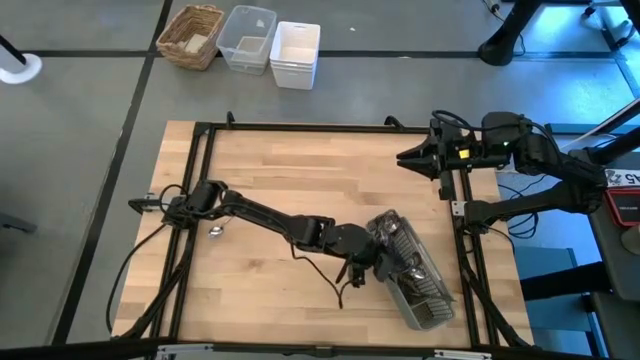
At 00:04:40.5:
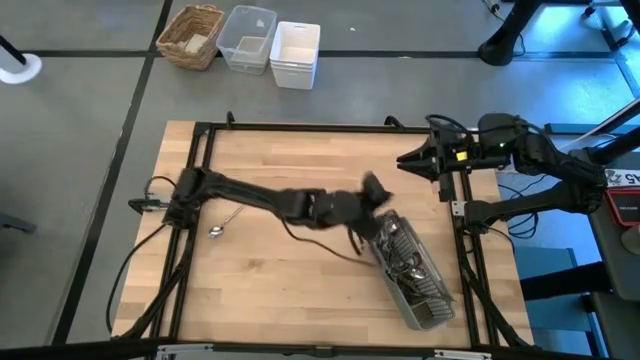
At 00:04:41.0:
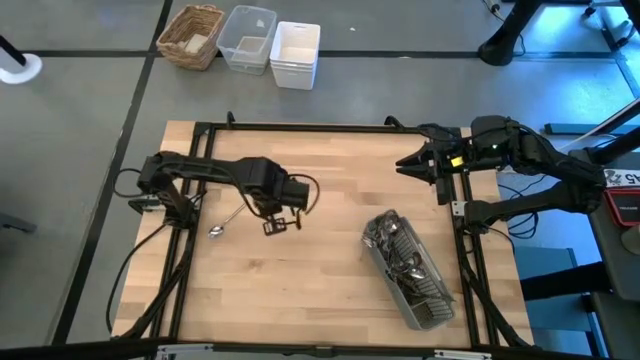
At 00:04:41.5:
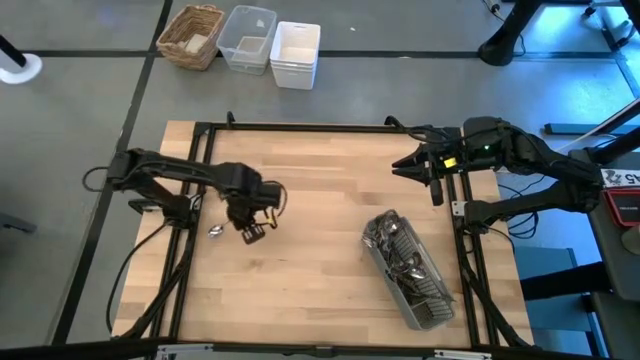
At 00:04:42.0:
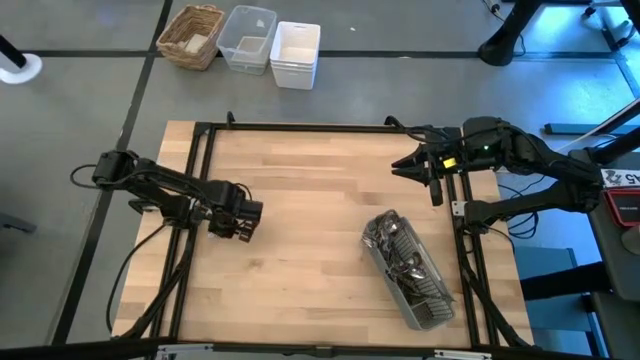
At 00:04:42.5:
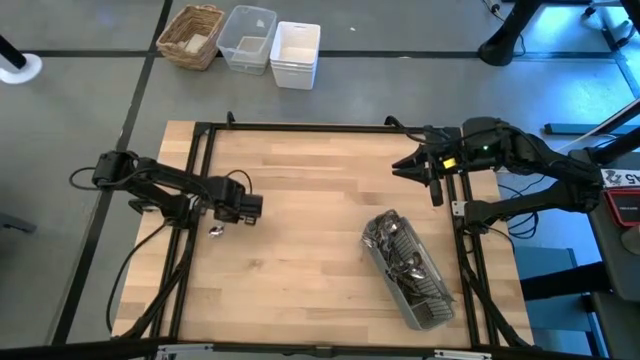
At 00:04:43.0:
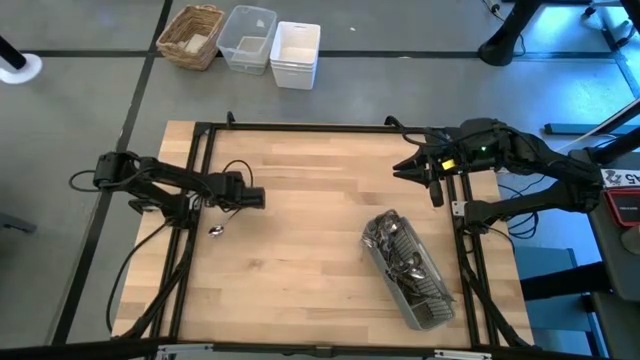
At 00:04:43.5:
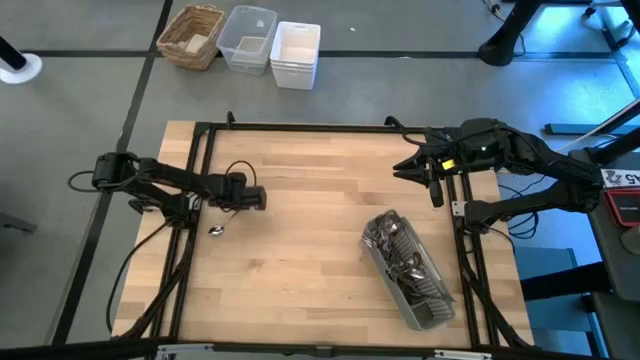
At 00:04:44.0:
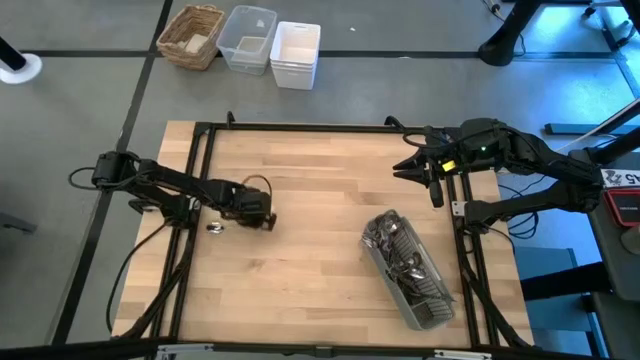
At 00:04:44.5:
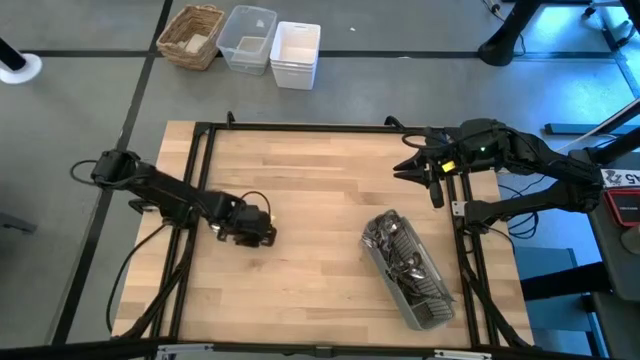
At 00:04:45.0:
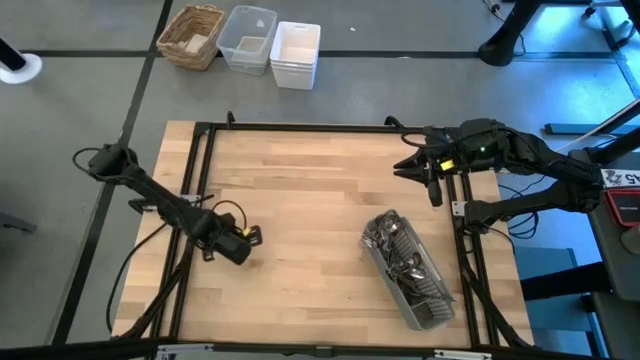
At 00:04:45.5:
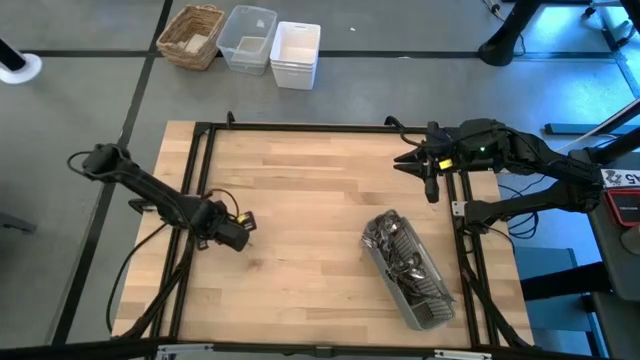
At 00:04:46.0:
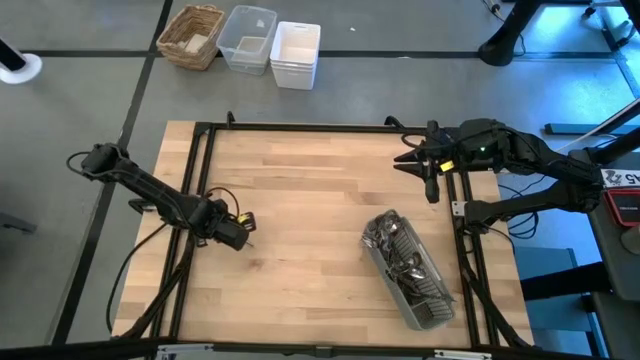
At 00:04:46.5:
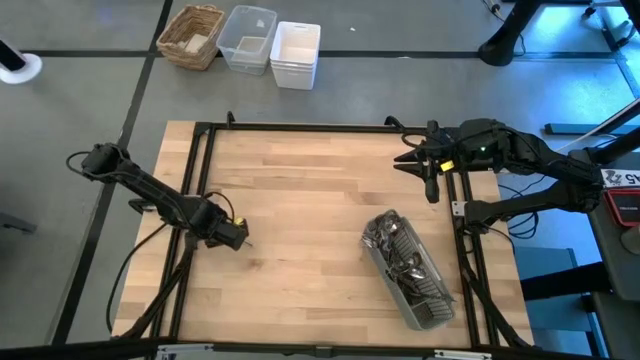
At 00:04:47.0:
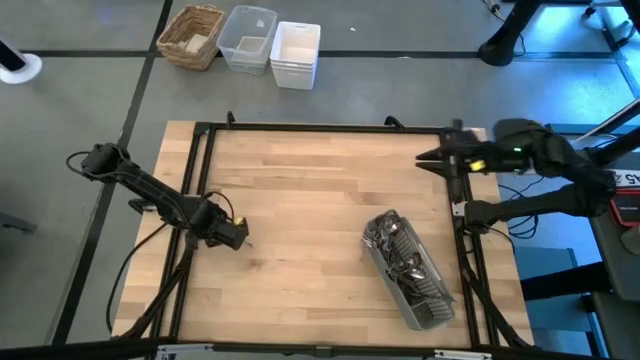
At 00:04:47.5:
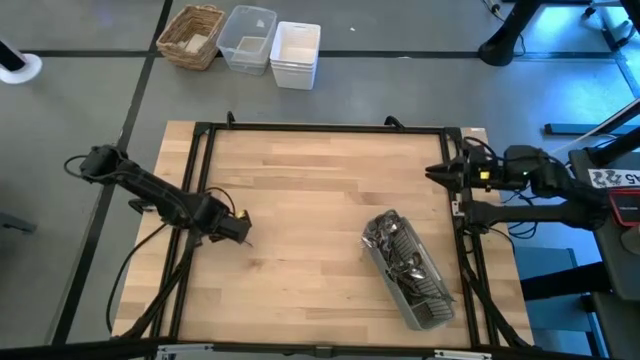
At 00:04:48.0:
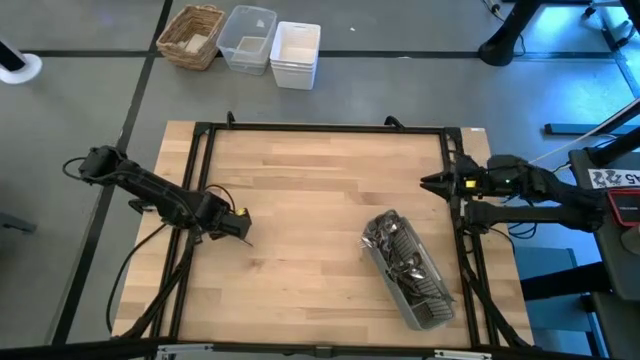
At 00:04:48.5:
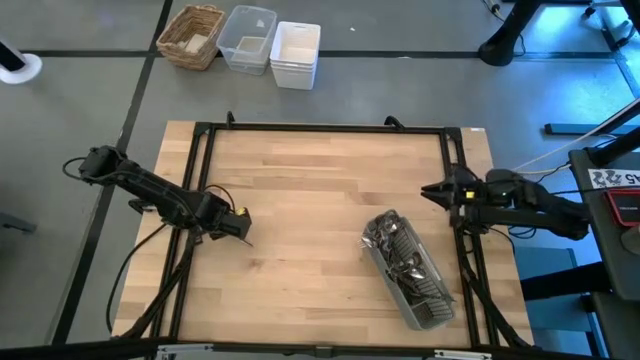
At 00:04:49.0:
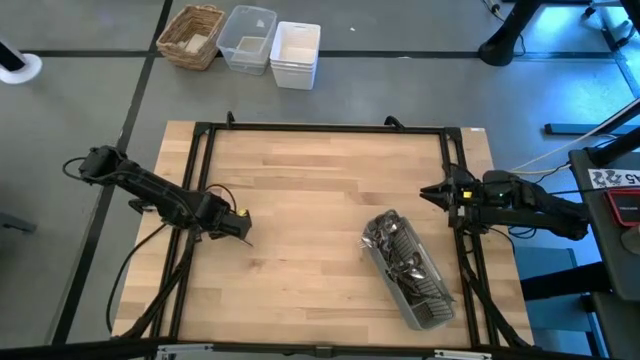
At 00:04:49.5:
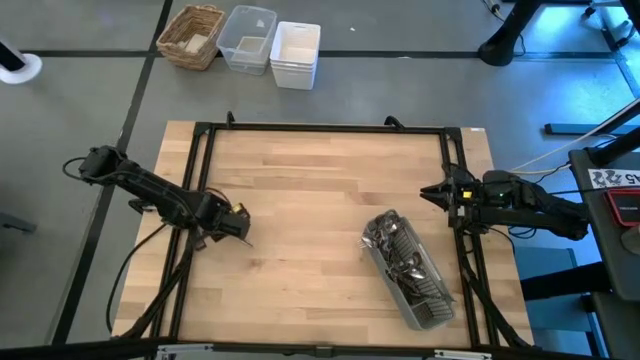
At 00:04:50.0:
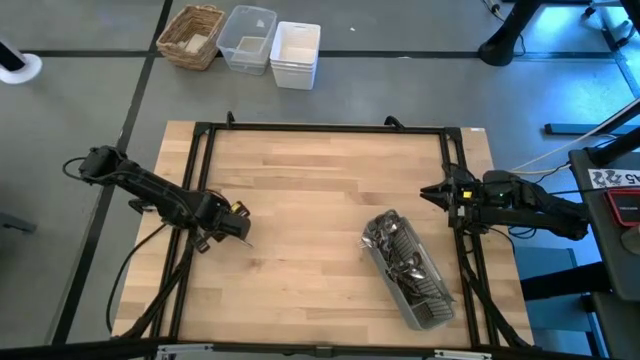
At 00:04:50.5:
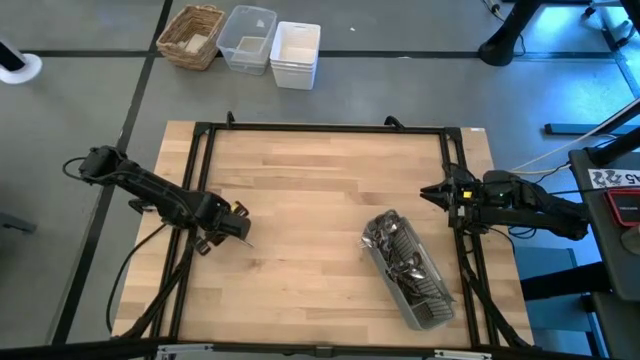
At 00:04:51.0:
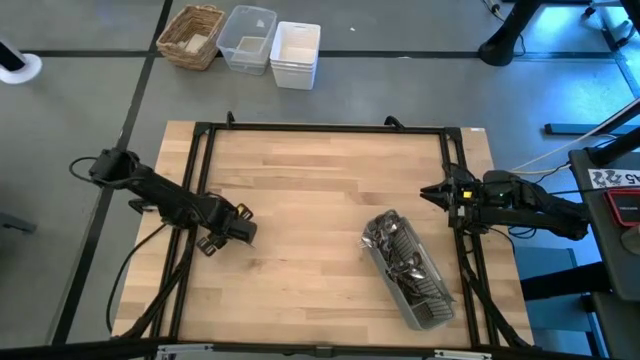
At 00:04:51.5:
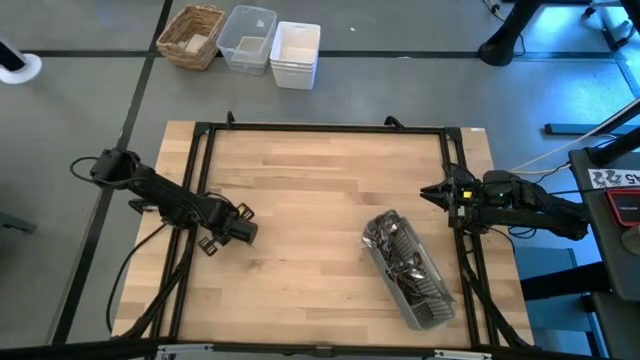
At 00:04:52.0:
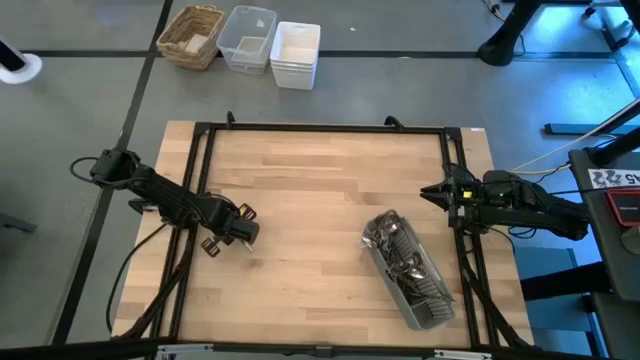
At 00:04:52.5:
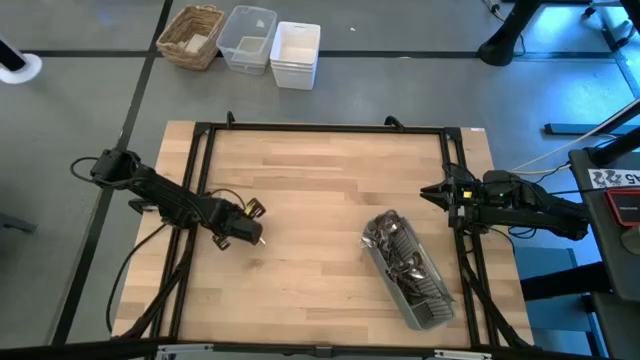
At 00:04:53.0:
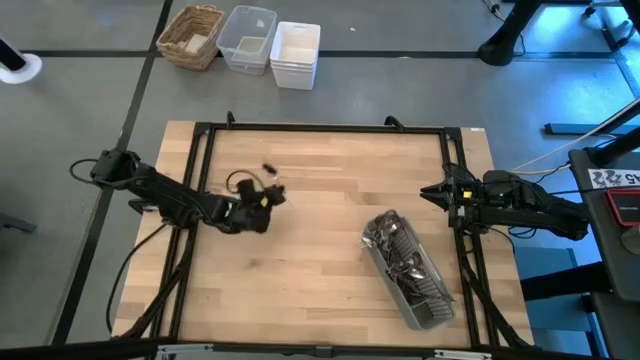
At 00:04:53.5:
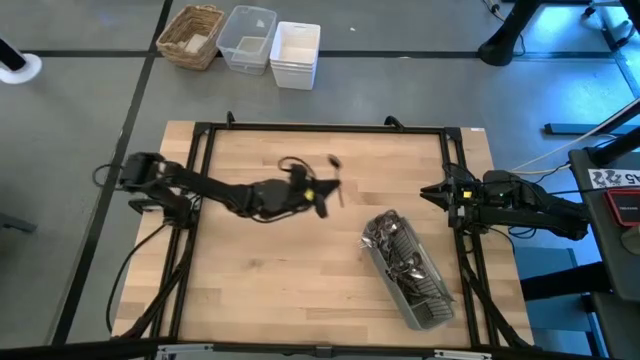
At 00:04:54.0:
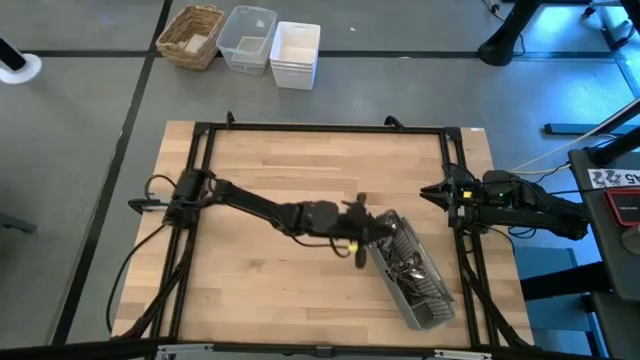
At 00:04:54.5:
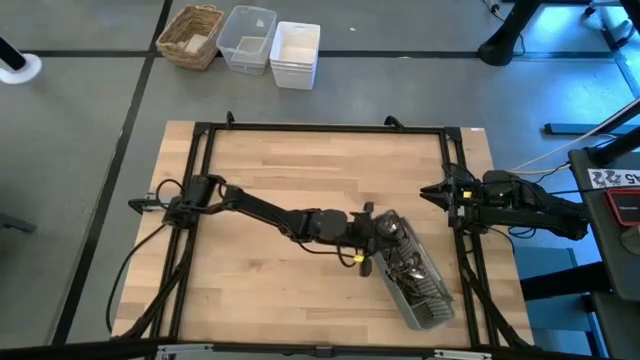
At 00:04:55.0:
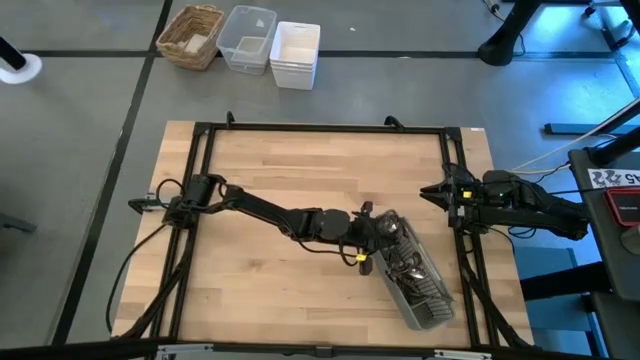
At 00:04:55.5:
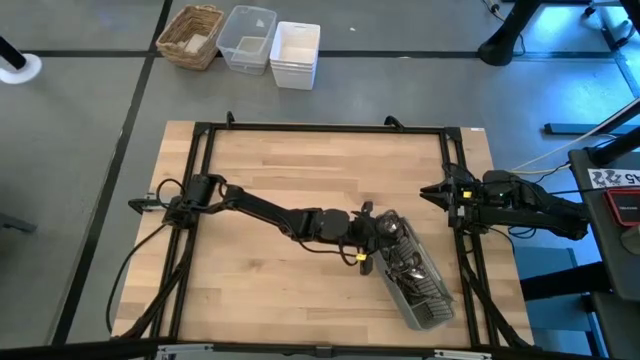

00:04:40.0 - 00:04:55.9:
Task: Sort silverware
Put the silver spoon into the gray silverware basket

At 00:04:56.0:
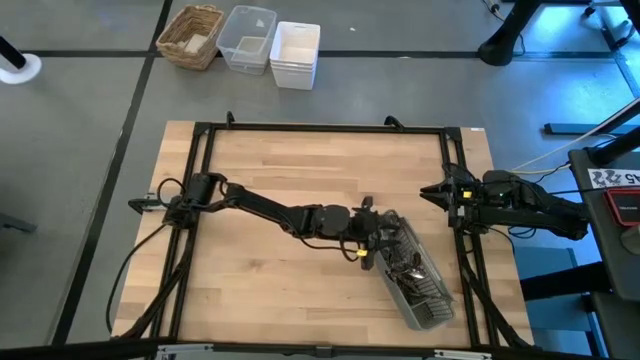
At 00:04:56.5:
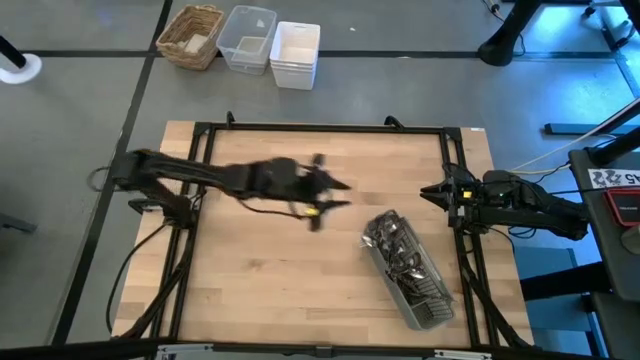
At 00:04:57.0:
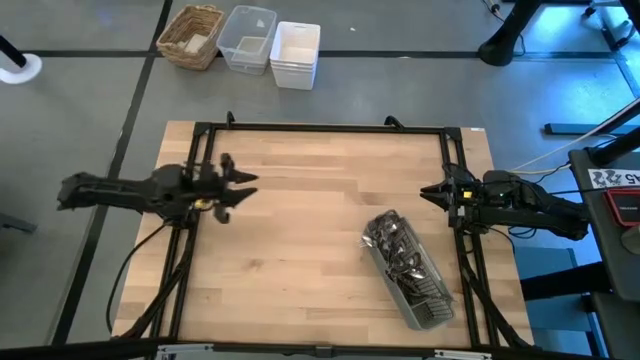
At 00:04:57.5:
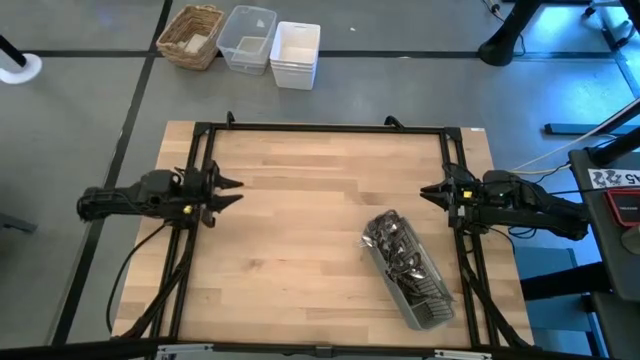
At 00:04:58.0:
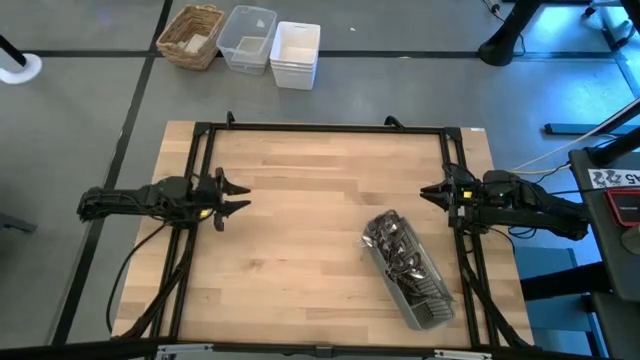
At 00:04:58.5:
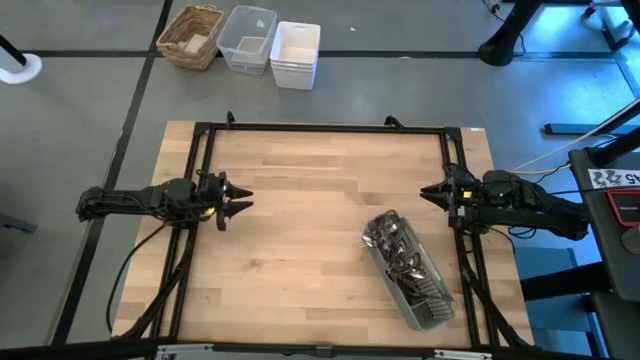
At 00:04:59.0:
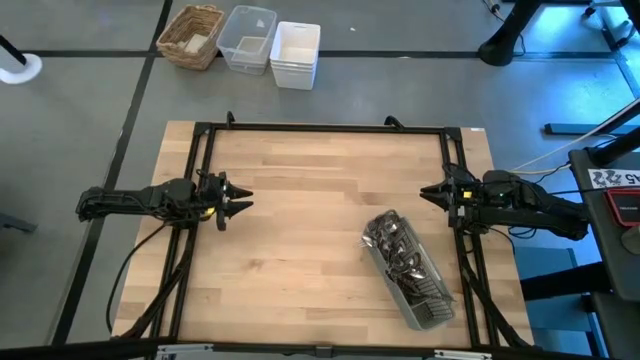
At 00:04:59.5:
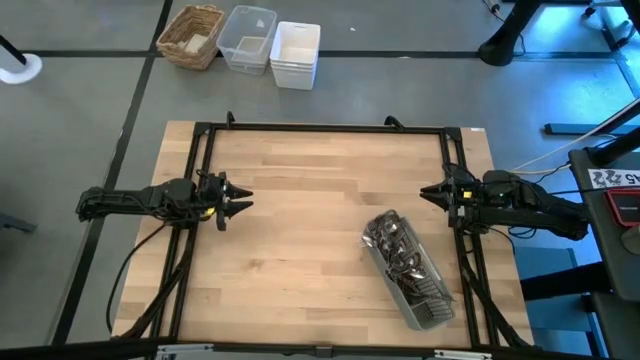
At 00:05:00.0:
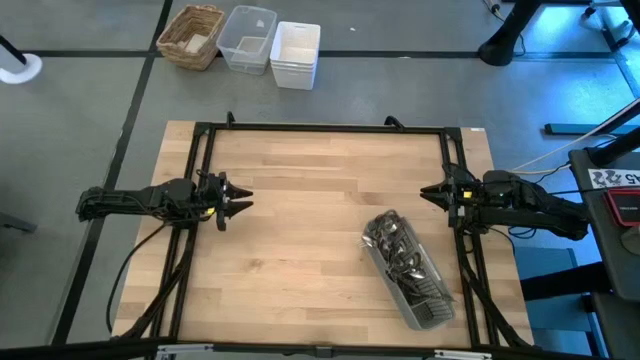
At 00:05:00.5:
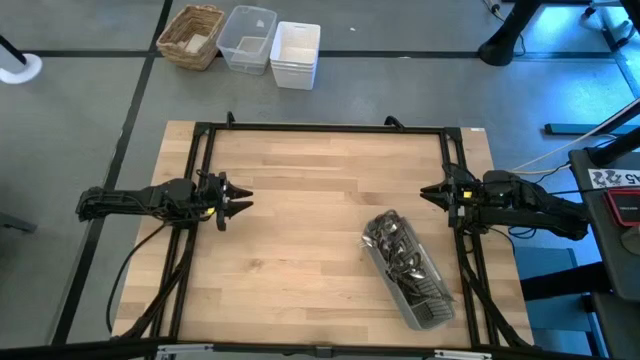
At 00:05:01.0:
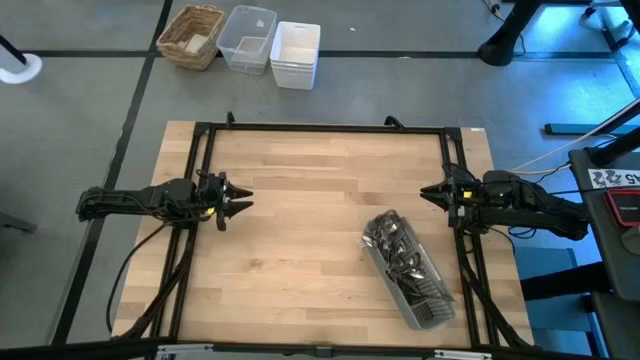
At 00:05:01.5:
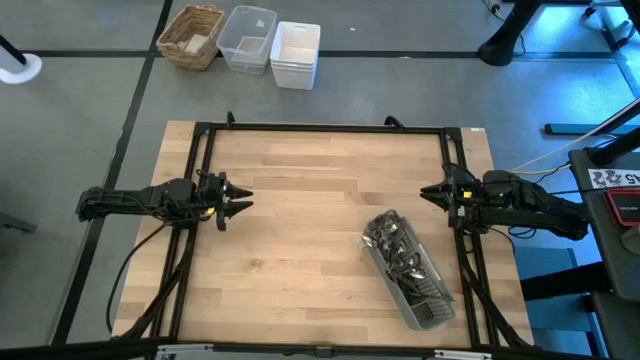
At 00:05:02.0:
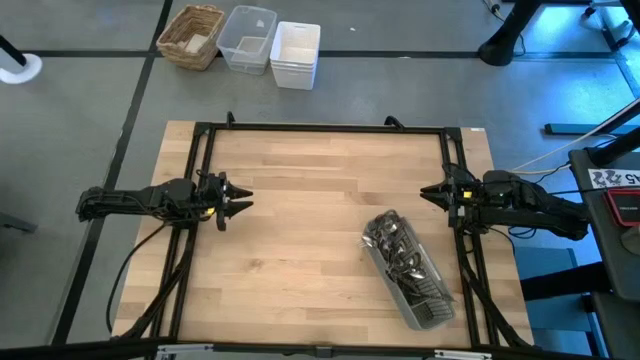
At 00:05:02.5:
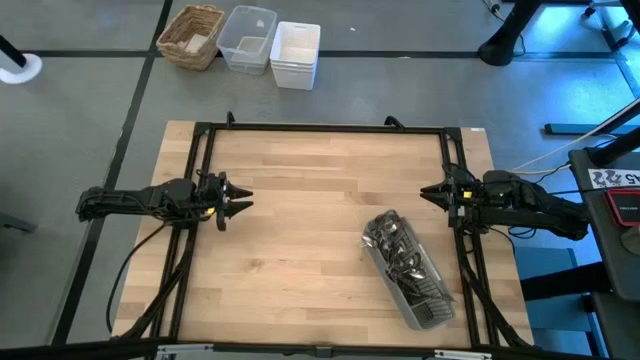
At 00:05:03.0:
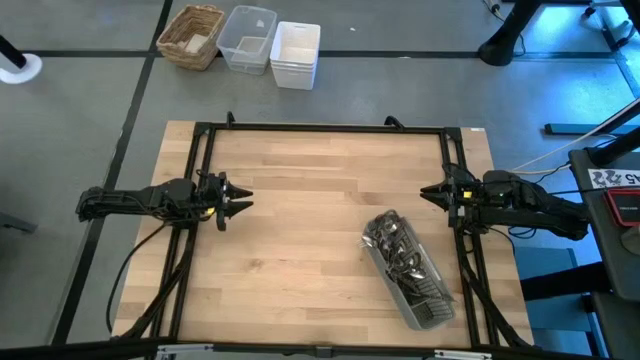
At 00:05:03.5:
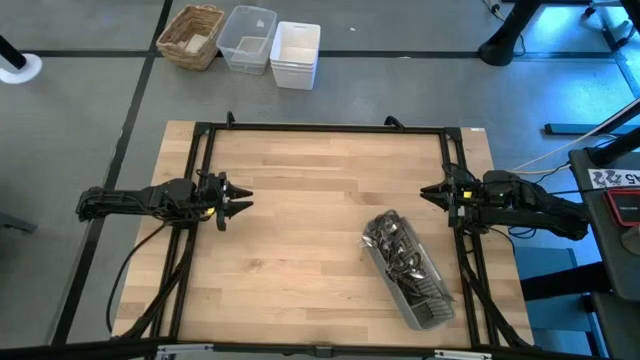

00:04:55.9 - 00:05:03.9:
Return to Home Position
